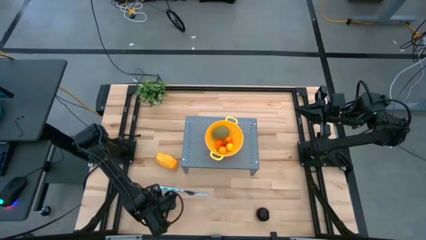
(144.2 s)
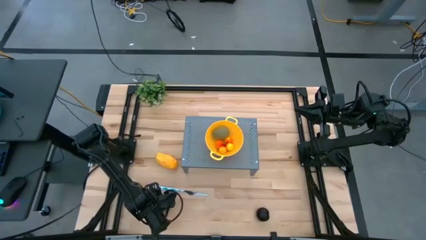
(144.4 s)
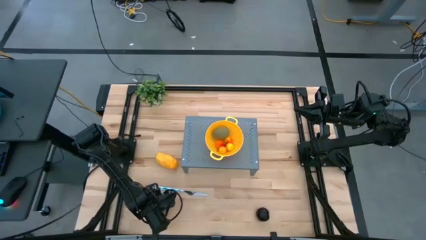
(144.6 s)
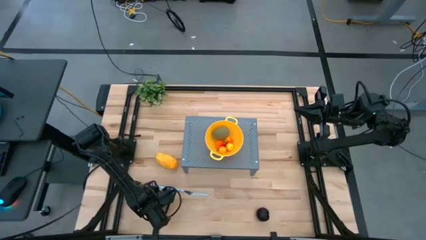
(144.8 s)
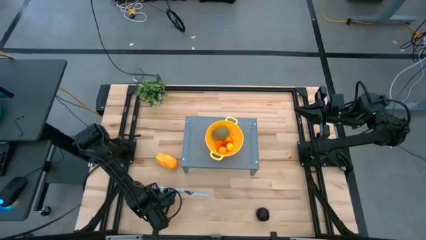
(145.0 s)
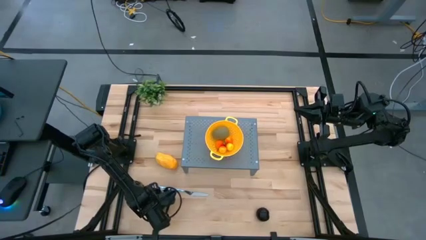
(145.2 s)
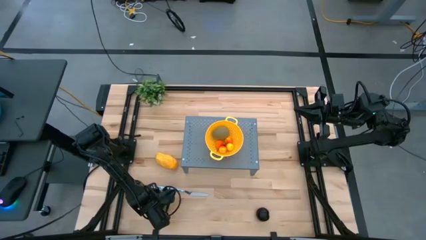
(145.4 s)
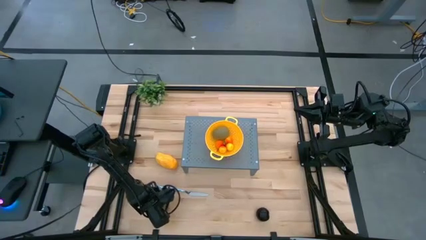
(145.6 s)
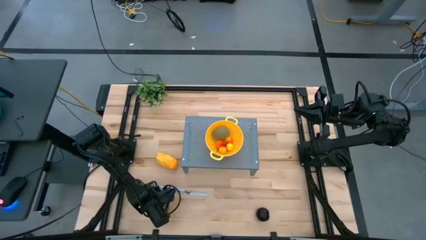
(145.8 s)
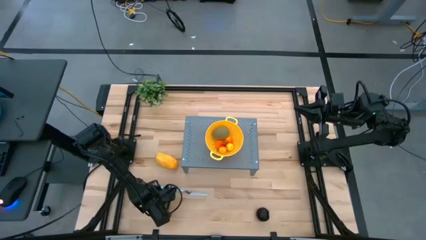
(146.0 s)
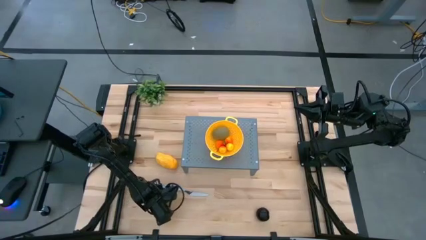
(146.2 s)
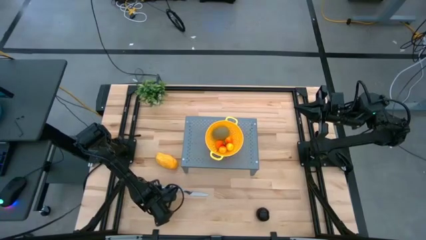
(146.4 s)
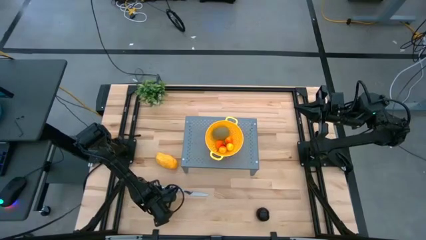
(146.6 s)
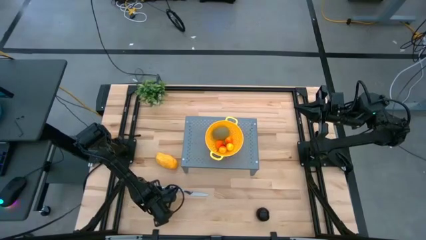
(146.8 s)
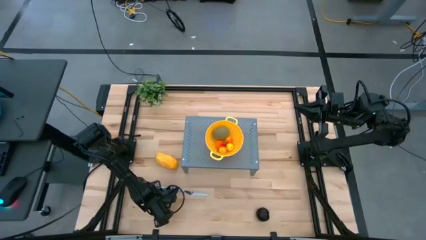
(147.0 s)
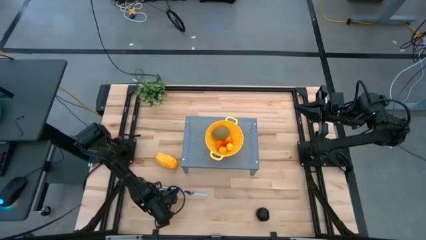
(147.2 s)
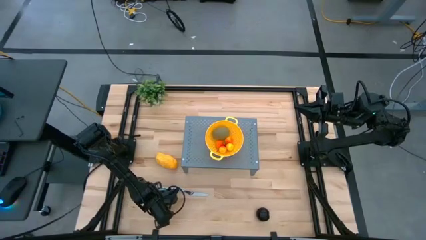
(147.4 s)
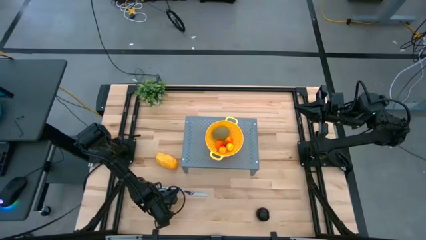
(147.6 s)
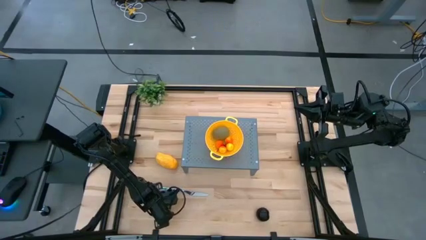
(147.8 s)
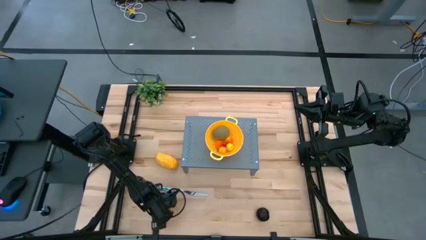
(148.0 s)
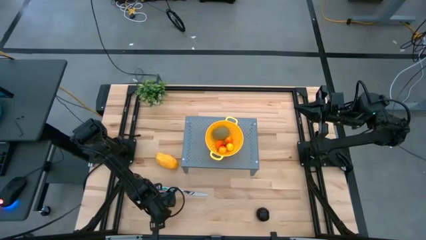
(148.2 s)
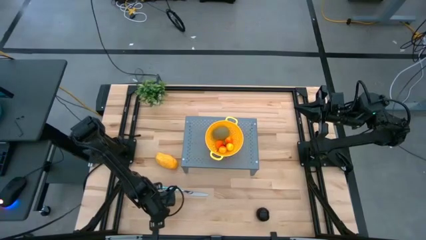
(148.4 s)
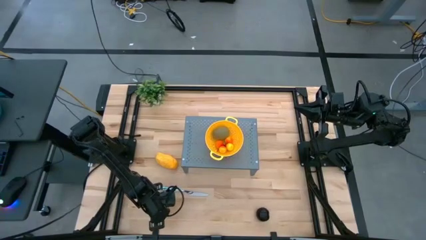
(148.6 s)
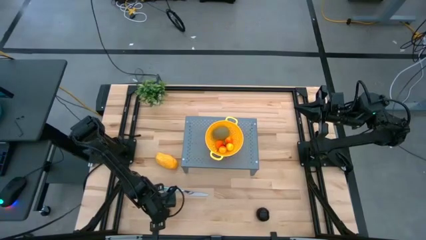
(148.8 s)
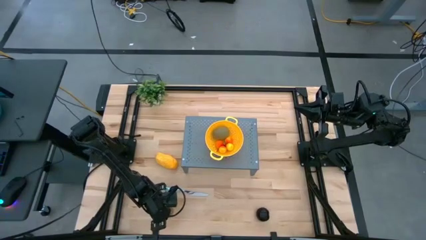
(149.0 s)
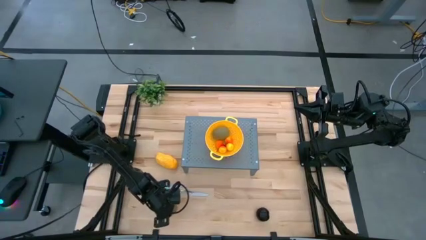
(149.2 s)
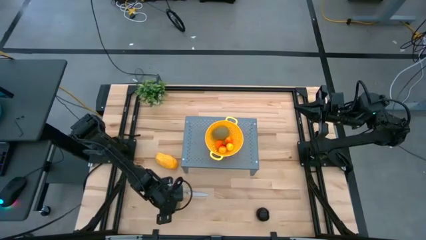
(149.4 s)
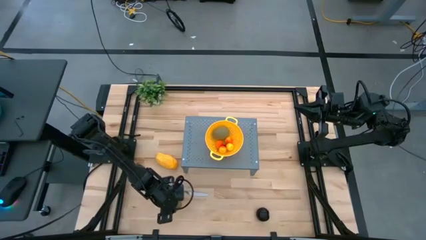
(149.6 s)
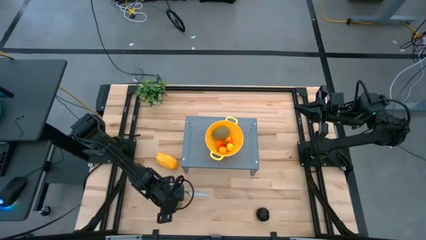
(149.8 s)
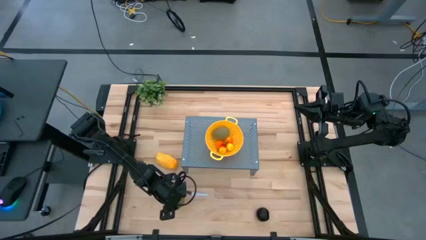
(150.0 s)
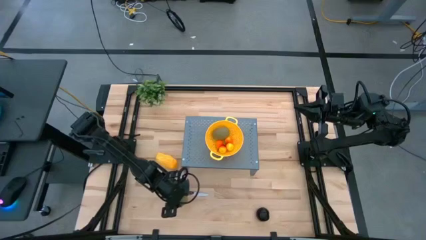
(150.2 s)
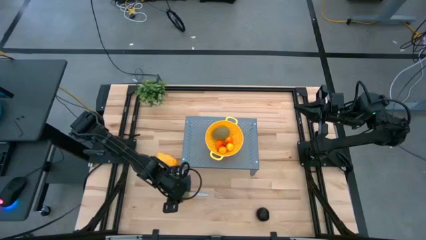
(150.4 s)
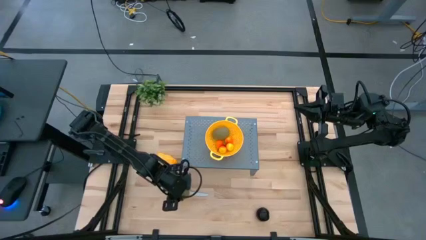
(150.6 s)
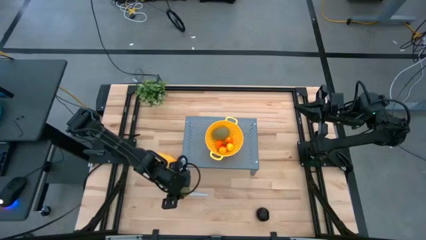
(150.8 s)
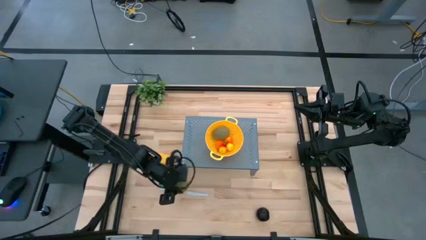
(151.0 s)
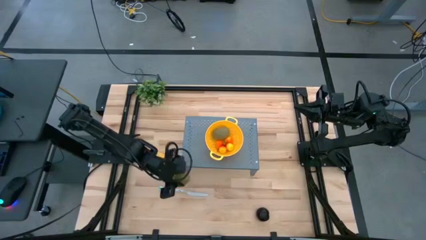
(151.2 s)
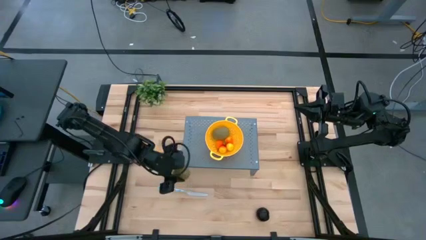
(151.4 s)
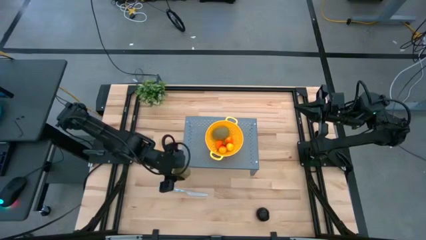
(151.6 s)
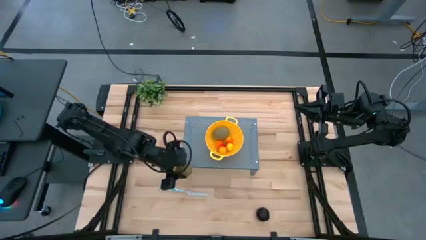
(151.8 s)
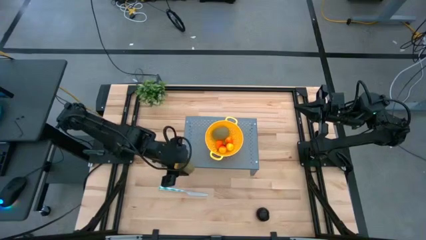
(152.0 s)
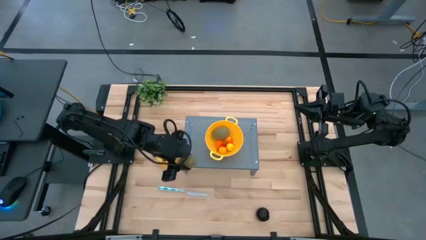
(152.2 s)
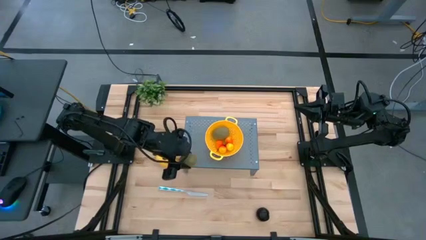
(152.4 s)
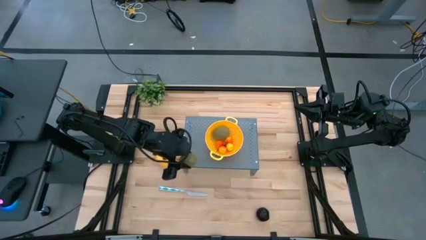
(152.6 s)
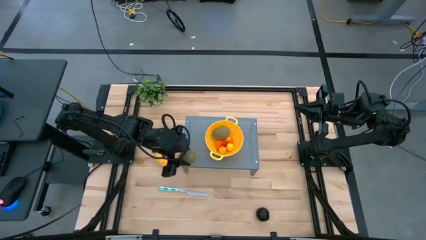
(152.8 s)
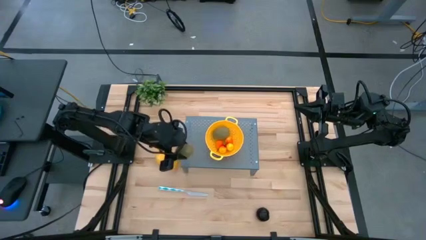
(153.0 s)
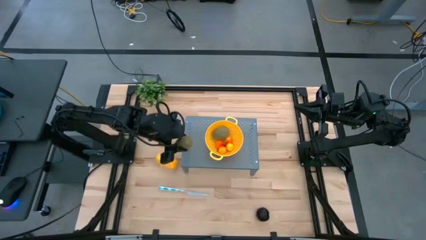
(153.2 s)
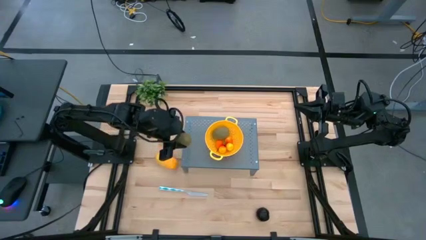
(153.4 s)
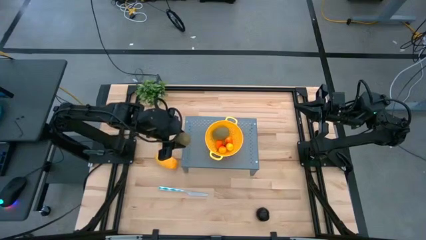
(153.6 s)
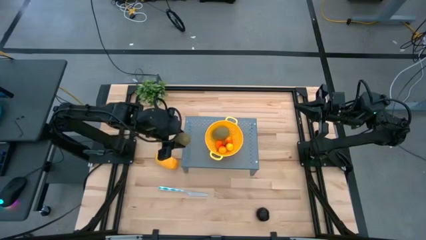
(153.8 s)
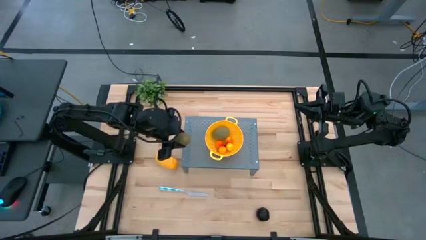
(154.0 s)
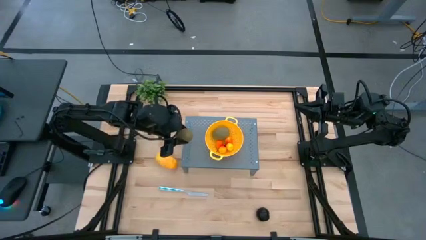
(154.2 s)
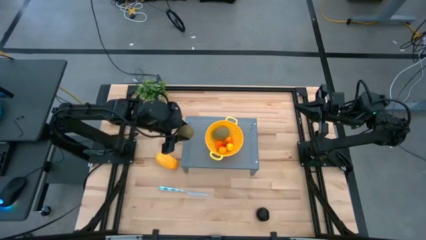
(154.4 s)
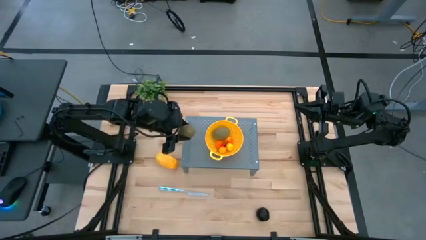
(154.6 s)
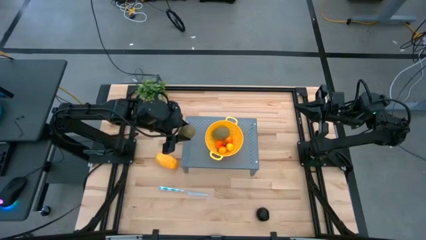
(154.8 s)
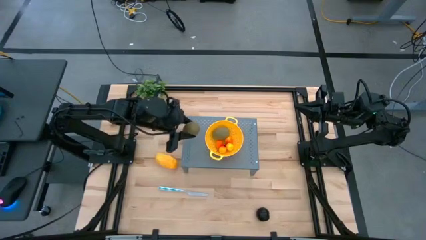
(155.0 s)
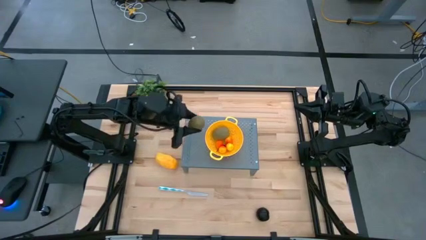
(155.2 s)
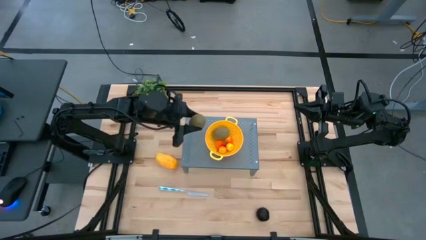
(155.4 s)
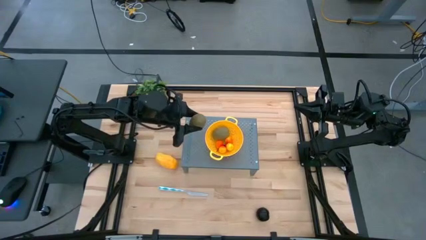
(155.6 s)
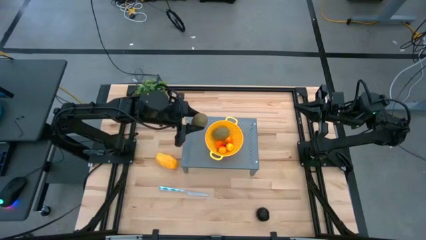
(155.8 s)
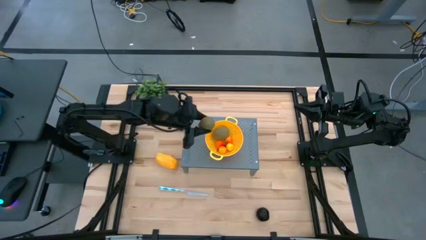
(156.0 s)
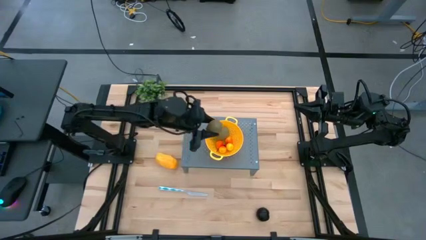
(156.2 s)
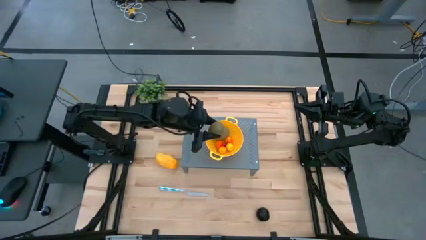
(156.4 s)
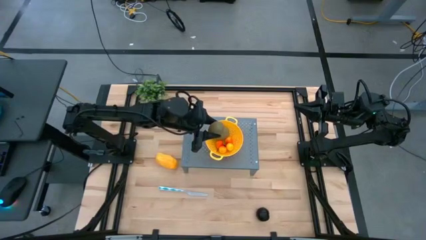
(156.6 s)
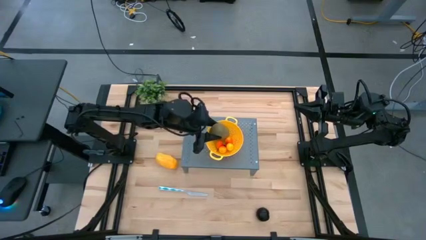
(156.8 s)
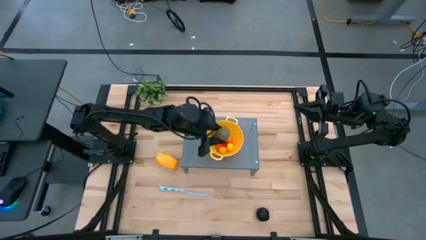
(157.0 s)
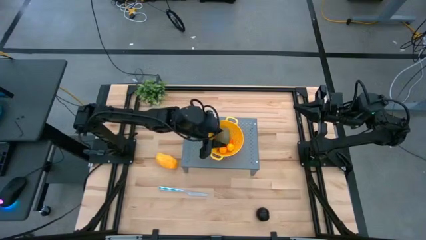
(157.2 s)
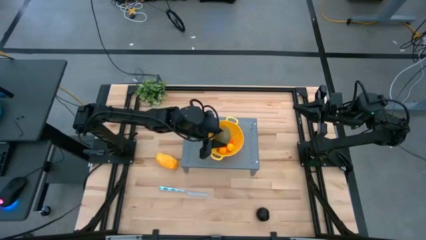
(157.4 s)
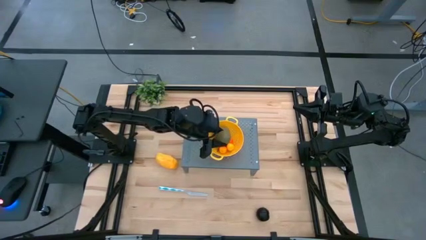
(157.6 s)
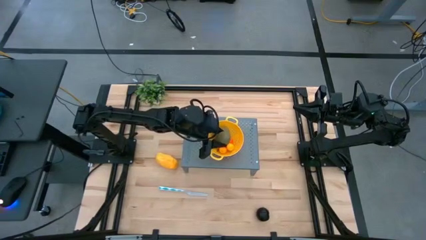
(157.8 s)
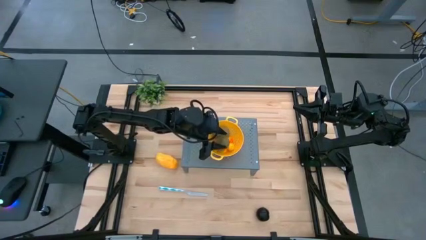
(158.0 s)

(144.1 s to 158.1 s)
Task: Pick & Place Fruit
Put the kiwi into the strainer bowl on the shelf

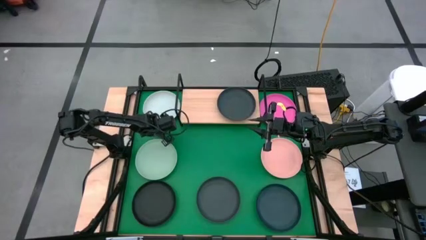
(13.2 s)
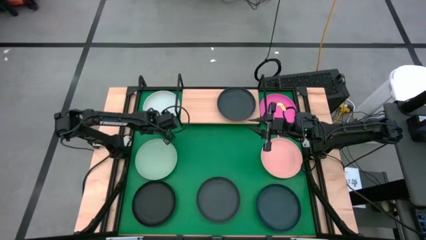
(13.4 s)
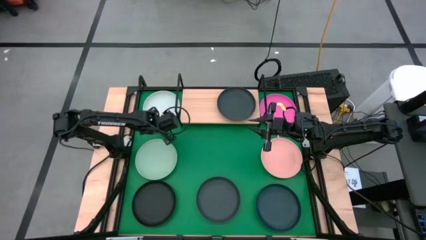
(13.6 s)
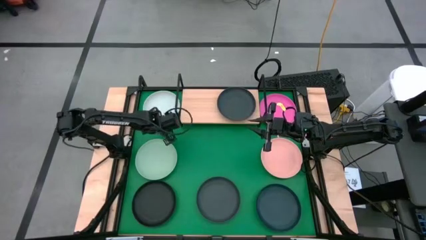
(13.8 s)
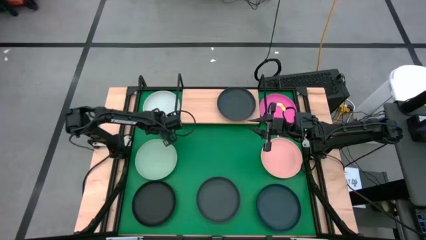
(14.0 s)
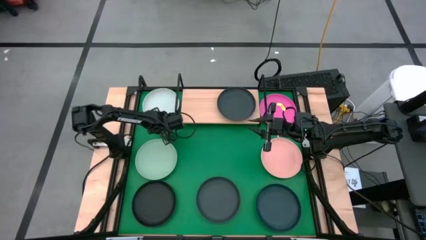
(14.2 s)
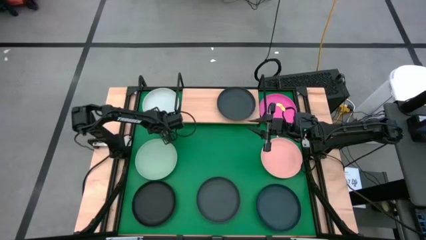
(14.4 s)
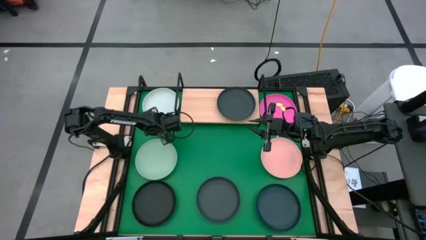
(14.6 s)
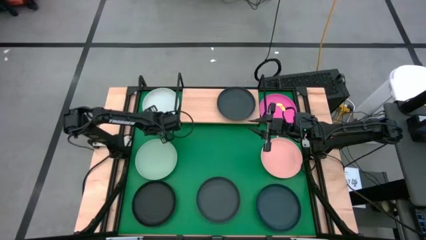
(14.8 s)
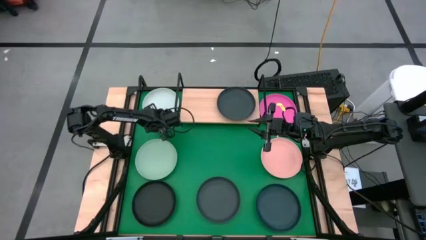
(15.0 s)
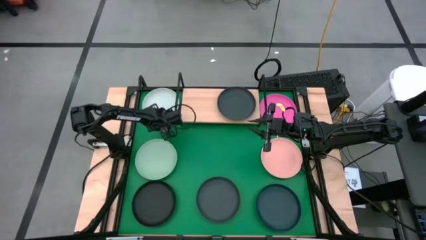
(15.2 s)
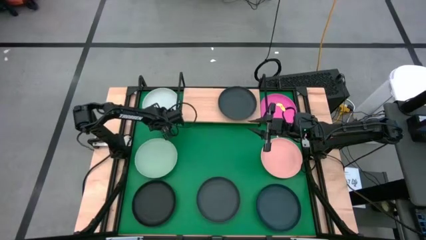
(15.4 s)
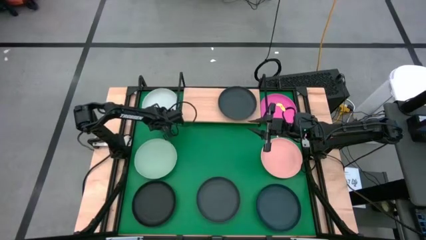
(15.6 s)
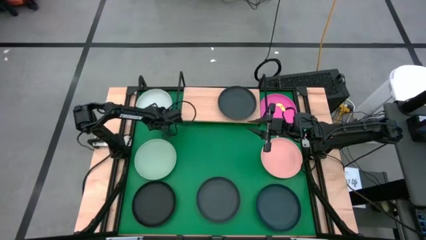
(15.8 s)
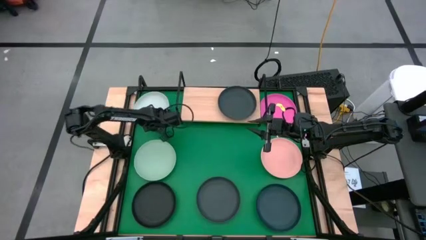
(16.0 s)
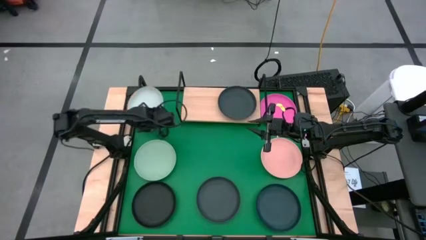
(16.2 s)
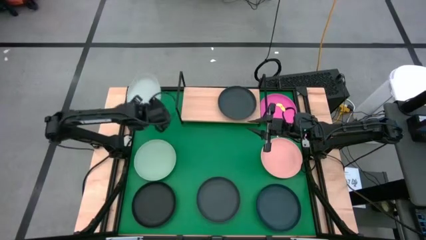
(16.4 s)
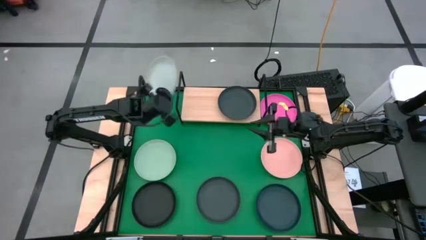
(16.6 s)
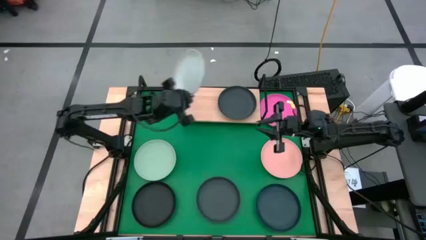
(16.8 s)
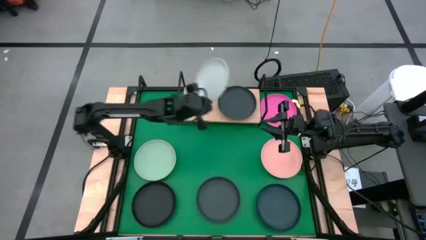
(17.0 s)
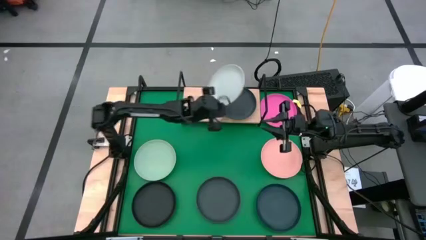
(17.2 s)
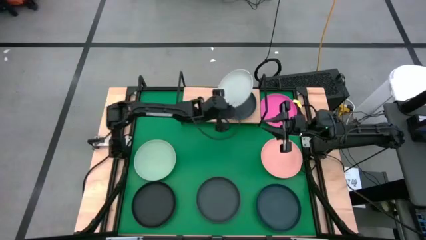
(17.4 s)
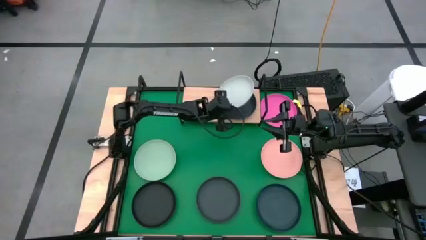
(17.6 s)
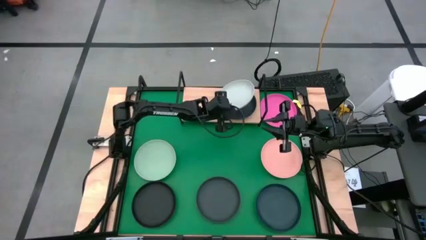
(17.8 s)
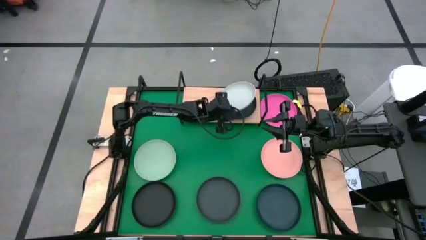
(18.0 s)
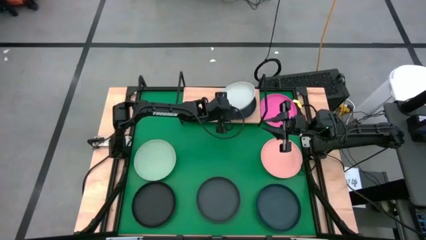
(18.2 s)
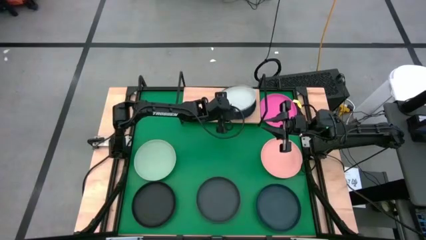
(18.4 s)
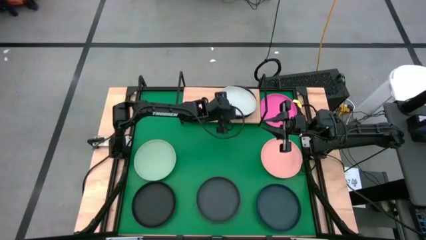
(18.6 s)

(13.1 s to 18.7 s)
Task: Place and stack plates onto a shelf
Stack the white plate on top of the black plate on the shelf
